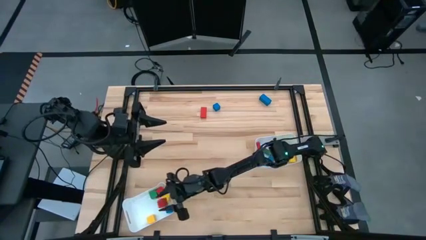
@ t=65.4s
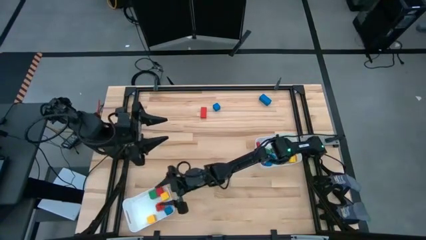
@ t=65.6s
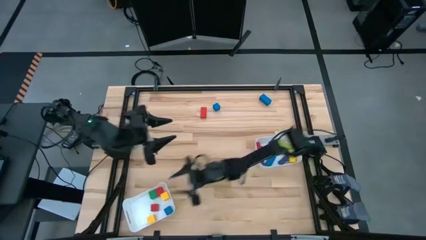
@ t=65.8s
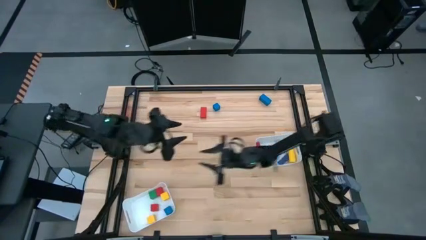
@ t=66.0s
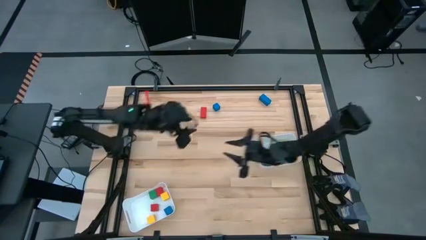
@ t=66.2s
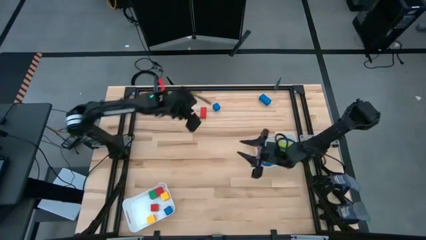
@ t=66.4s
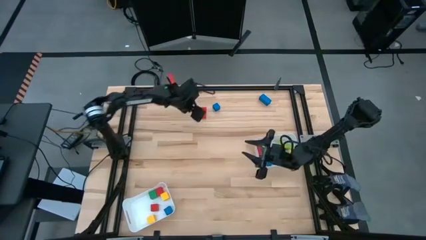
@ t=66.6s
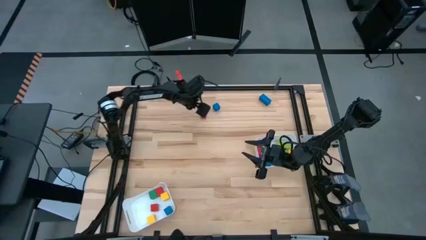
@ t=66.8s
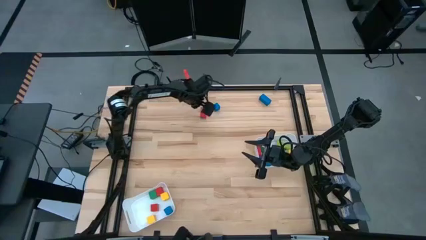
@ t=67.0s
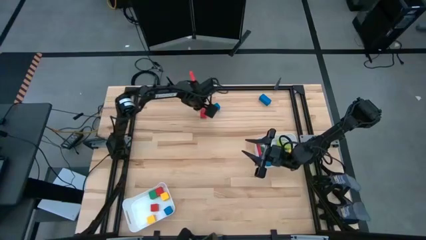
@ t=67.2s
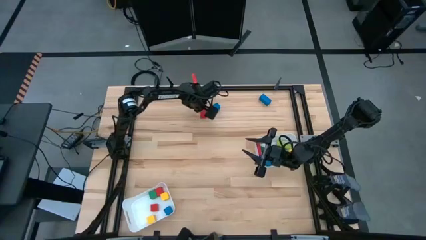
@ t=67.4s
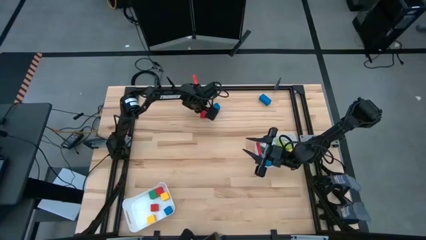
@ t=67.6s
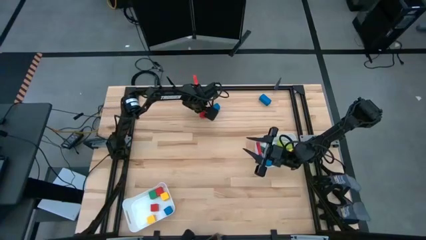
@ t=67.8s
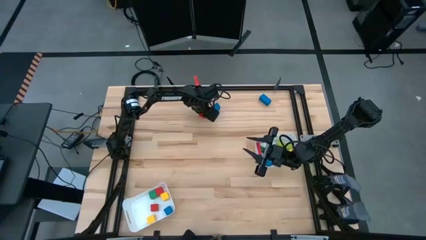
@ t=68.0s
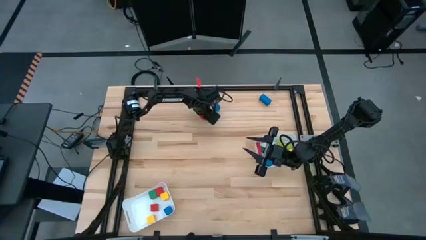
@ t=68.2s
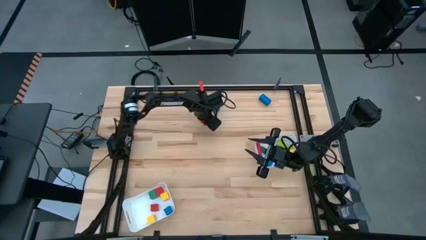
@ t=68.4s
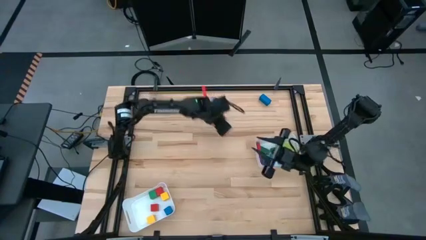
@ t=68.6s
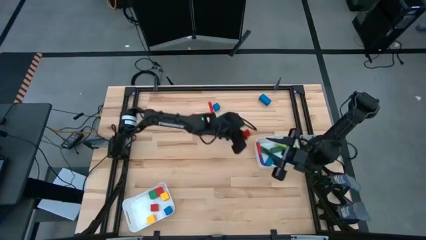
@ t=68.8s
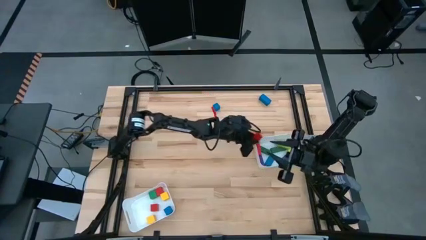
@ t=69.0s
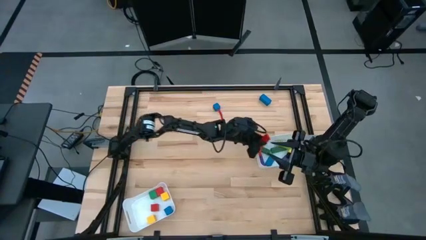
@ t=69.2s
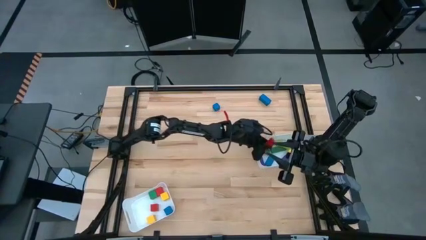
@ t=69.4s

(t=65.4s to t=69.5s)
Task: Sort blocks by size
Put the red rectangular block into the top white bin

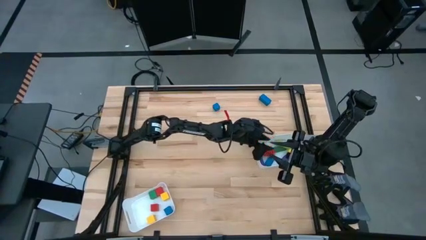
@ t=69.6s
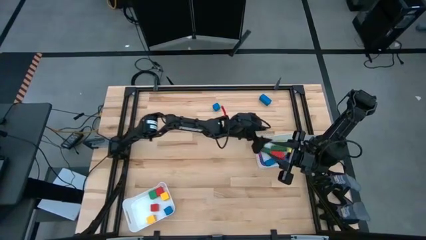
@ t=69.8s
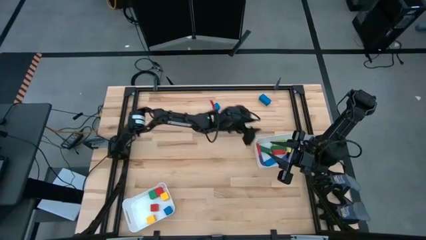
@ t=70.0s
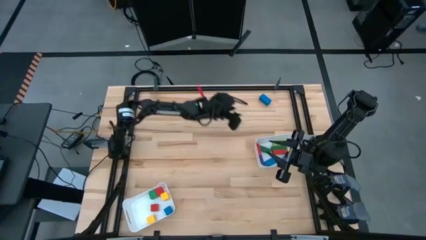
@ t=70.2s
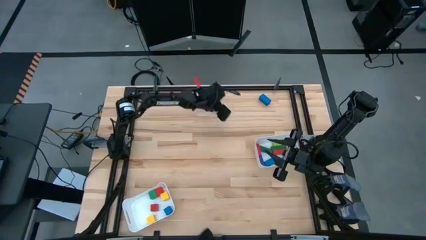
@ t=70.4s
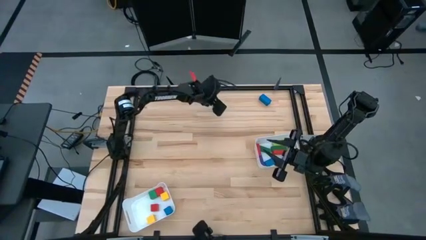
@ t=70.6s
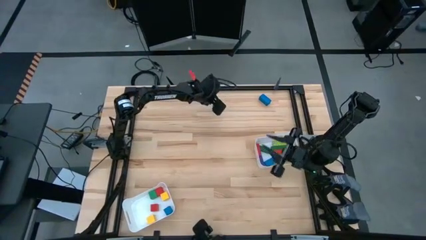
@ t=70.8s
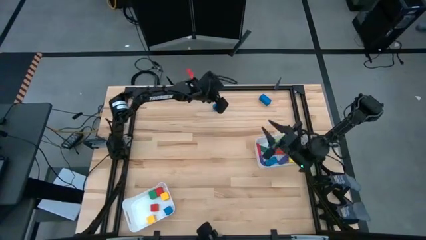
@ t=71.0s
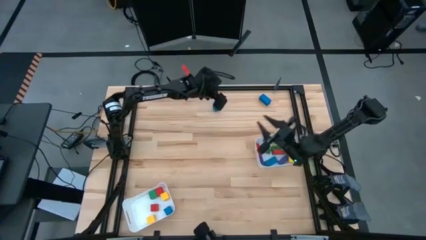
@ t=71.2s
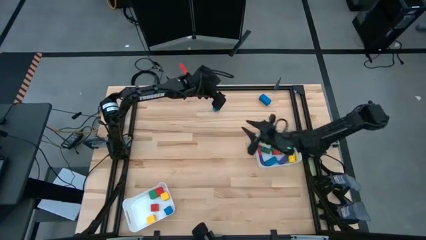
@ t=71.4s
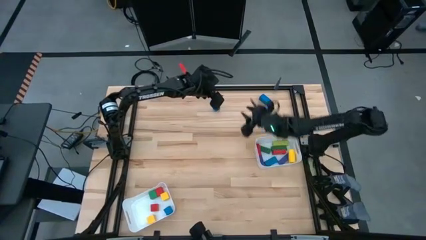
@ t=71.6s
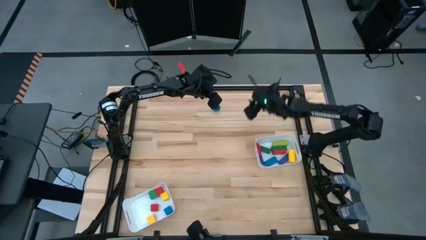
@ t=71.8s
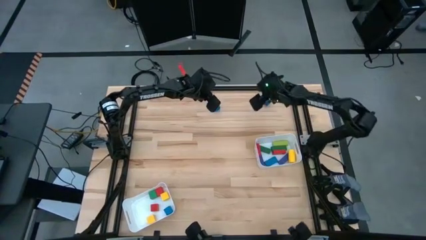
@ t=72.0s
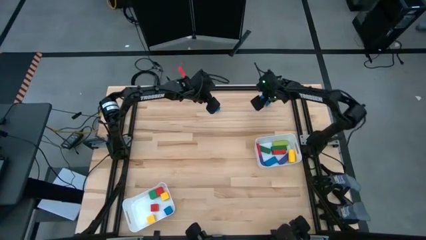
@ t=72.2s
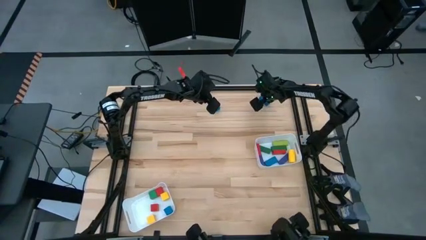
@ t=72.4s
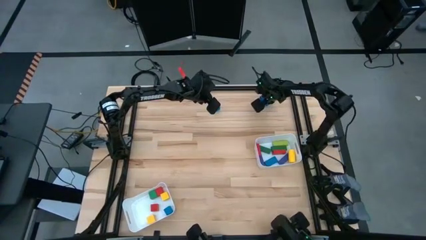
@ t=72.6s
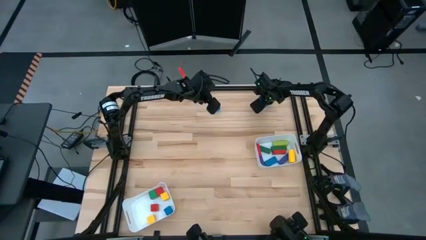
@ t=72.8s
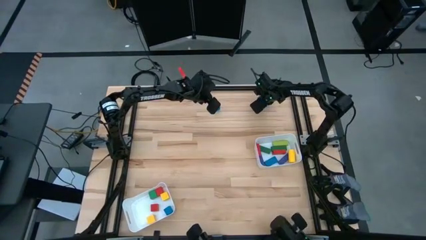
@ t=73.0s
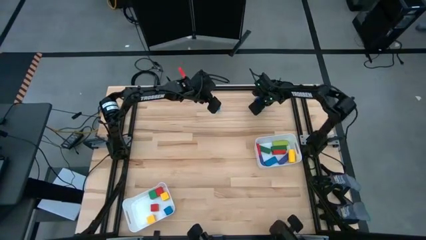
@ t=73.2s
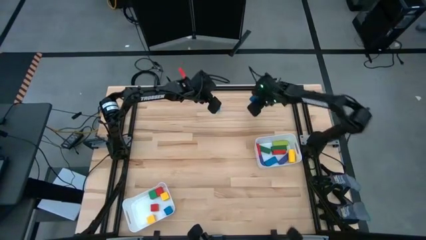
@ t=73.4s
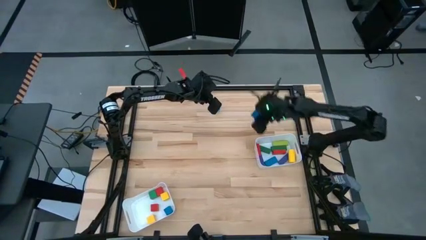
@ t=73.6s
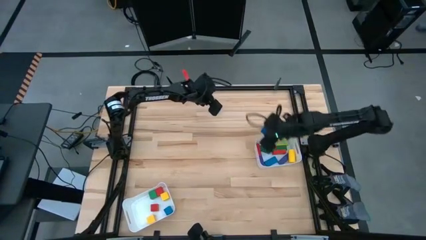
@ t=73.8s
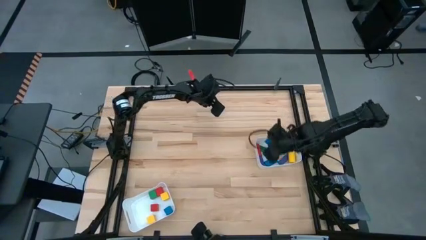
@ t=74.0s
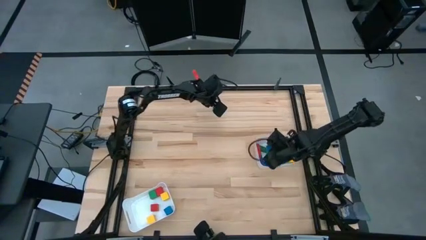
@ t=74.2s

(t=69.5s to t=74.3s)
Put the blue rectangular block into the top white bin

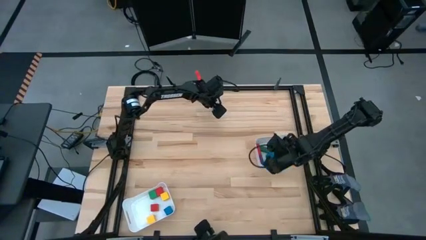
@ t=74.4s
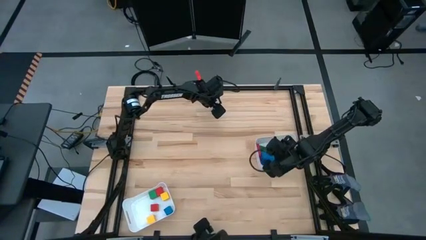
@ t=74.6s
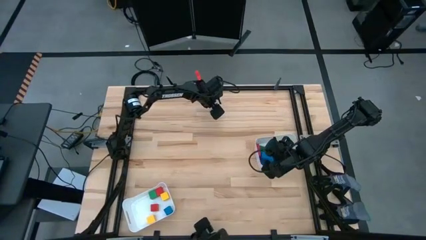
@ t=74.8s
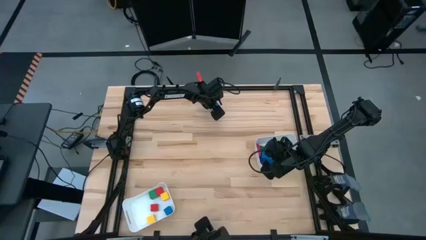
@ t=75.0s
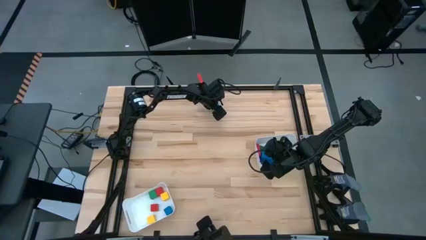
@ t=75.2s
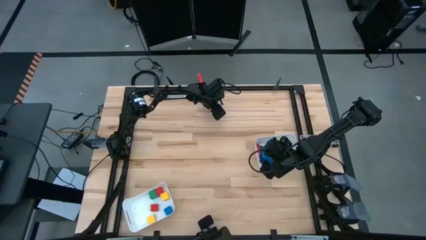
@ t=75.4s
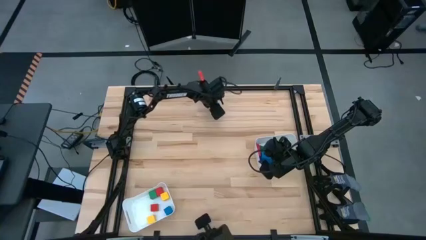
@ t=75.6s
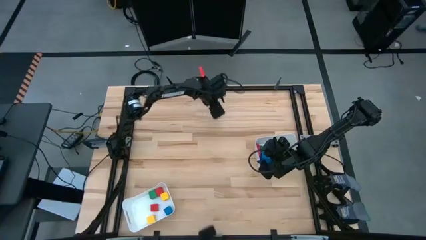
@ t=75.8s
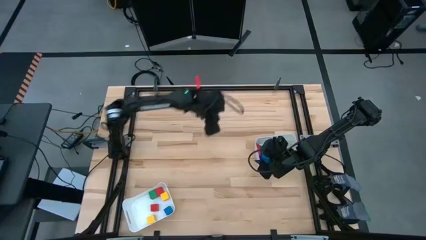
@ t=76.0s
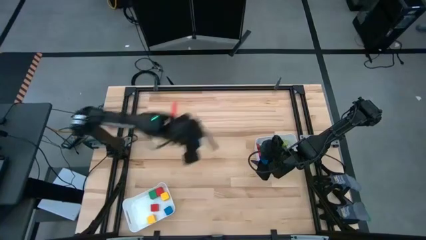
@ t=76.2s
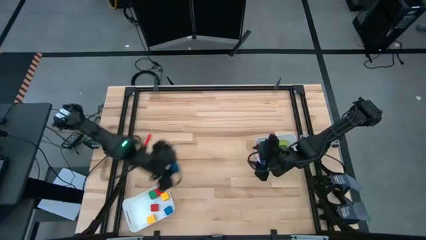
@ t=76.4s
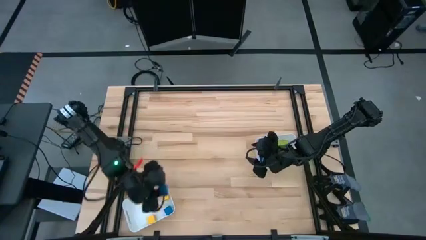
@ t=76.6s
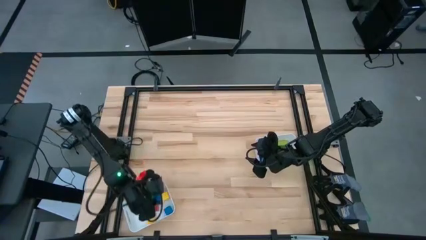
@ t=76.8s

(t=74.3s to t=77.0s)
Put the blue square block into the bottom white bin

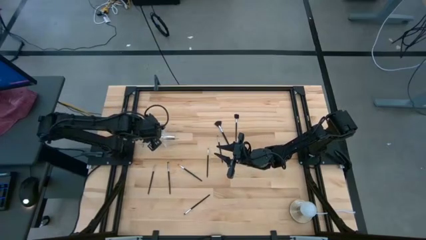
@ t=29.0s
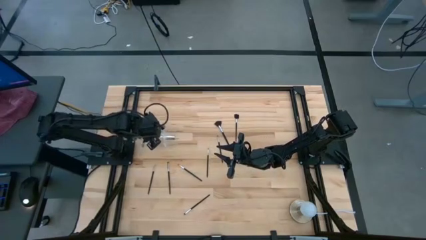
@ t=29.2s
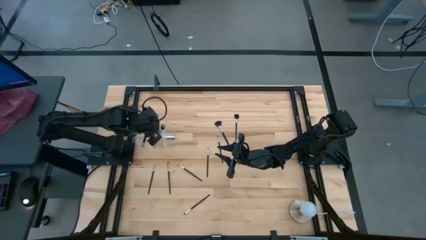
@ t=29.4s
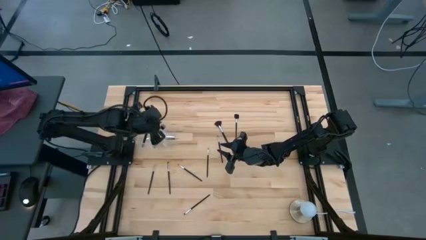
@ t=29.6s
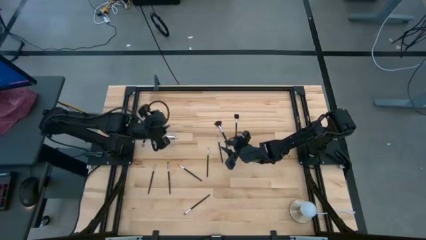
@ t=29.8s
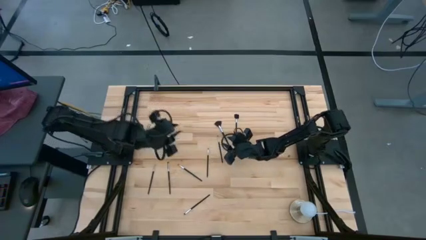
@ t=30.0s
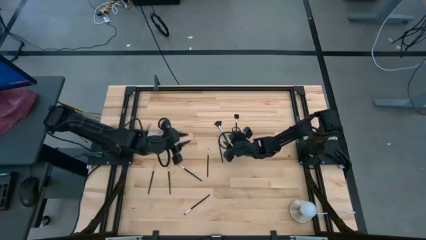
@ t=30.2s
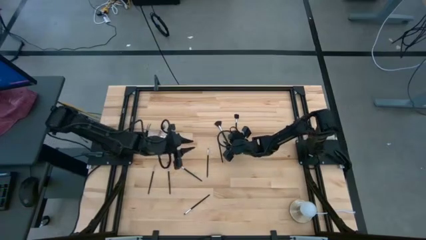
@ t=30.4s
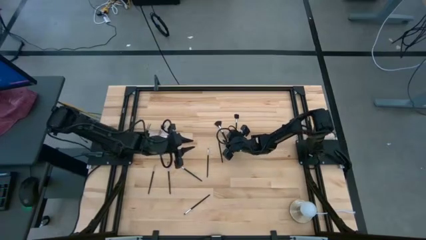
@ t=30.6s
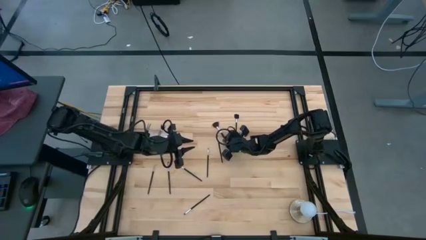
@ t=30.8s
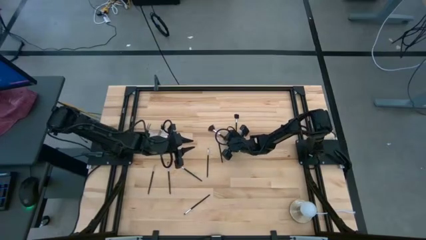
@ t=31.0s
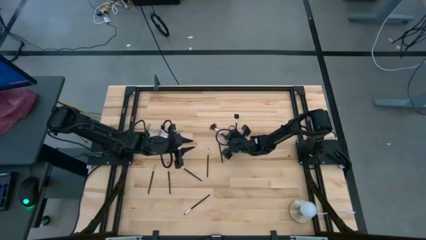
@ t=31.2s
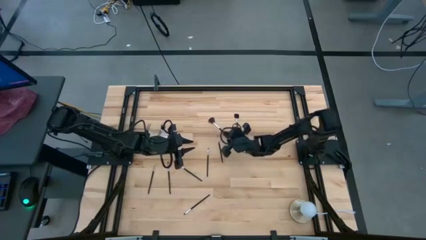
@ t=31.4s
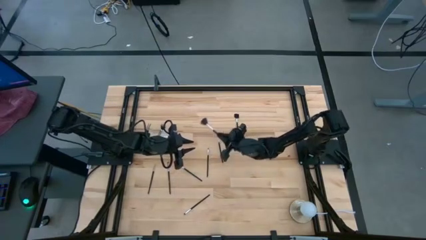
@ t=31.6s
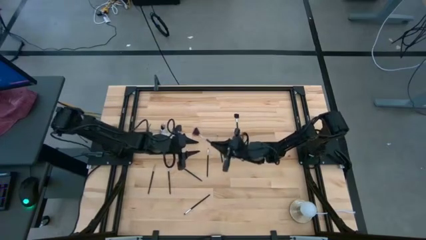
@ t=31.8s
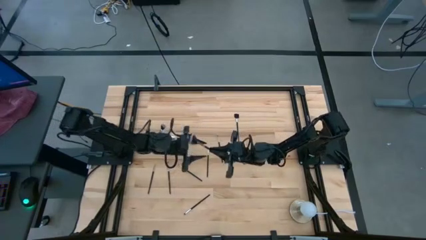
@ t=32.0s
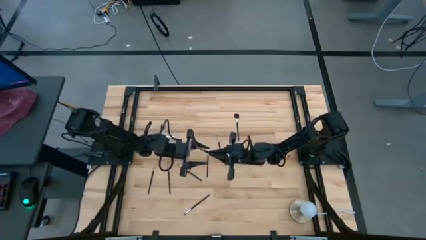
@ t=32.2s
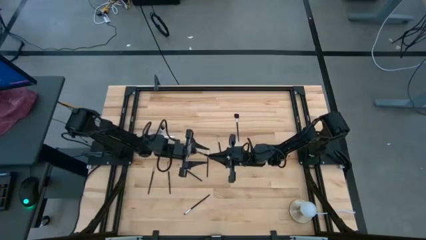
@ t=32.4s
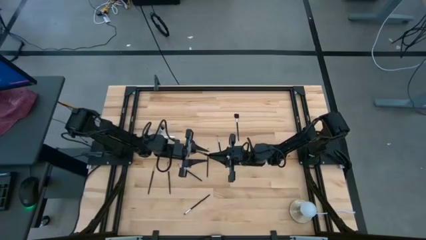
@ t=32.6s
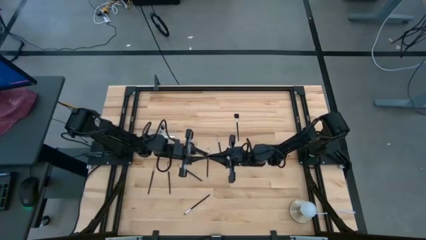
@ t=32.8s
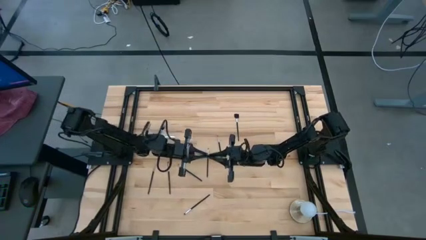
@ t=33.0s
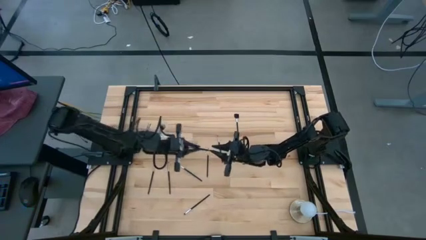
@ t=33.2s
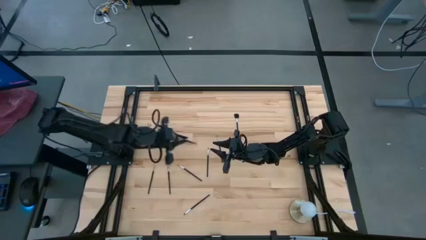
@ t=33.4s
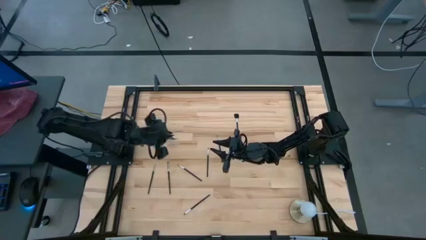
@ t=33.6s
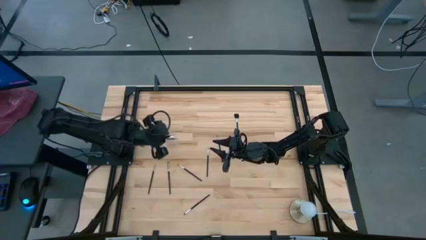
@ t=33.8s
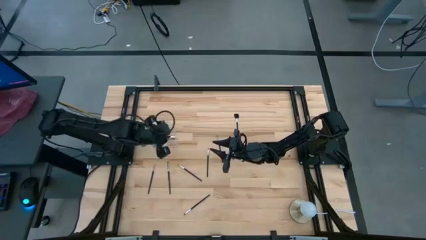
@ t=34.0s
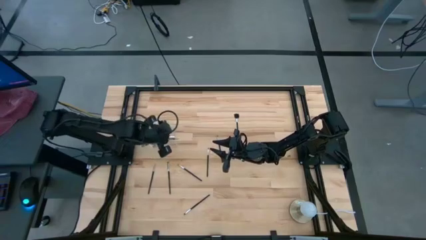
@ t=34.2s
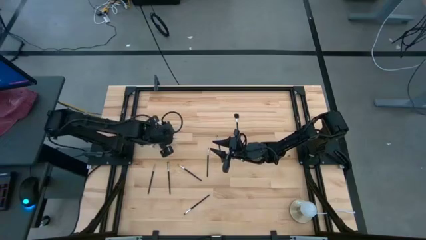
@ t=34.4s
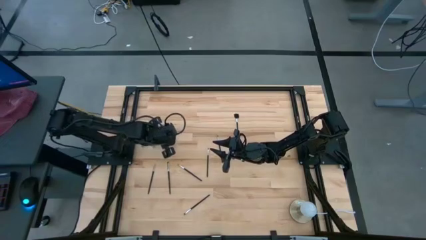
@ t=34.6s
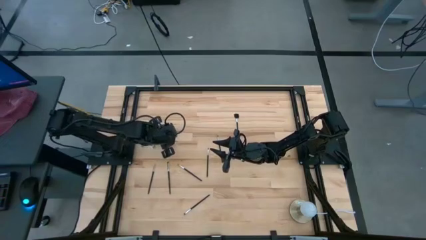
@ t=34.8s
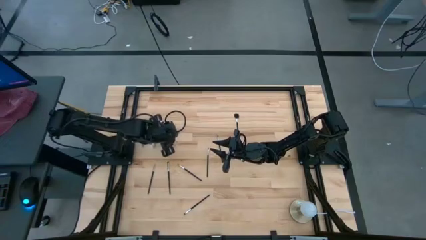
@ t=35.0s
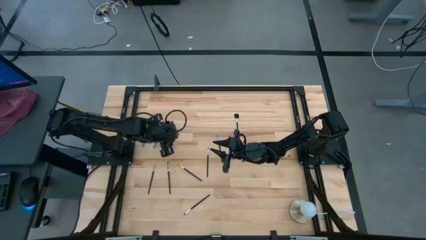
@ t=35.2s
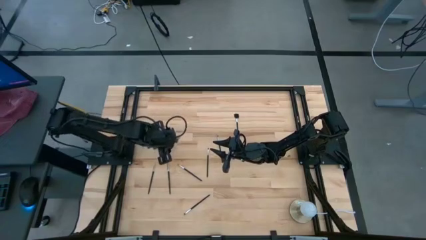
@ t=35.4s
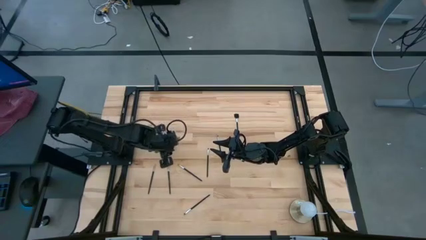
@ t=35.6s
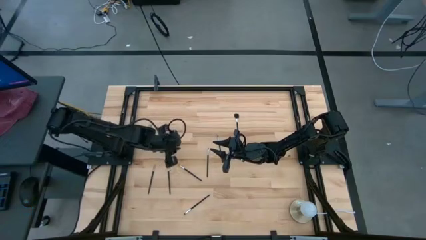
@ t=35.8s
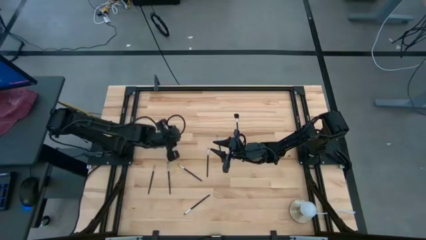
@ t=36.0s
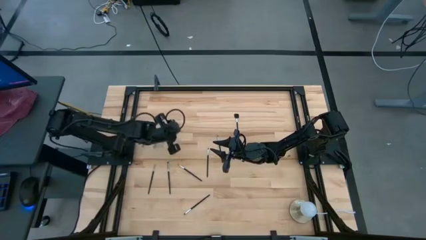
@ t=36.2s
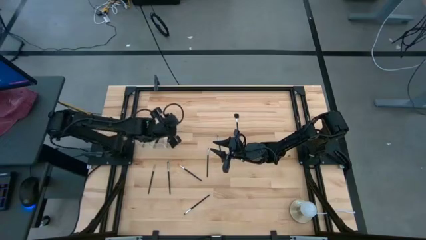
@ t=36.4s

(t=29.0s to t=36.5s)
Task: Put items in baskets/containers
Put the black highlighter brush into the transparent organizer
